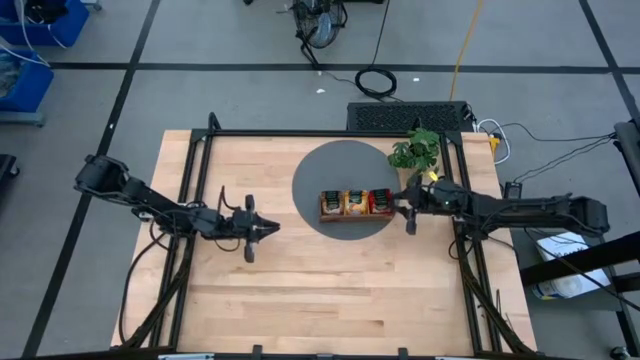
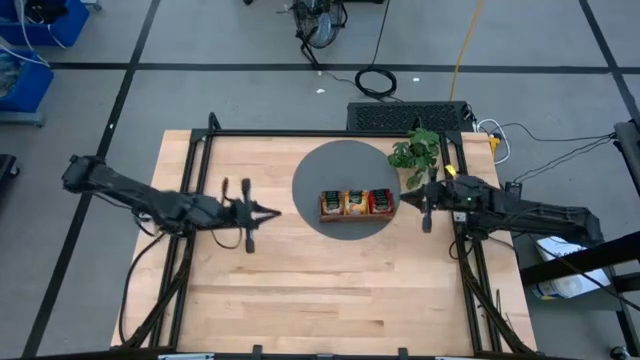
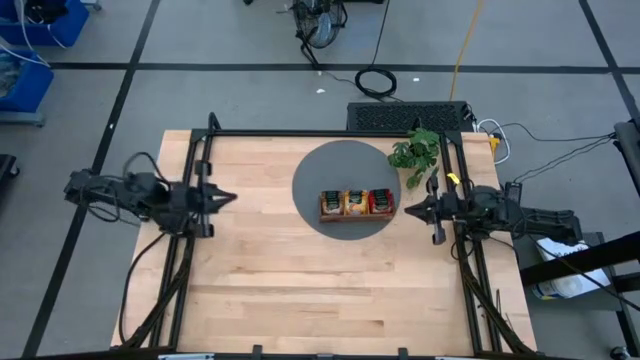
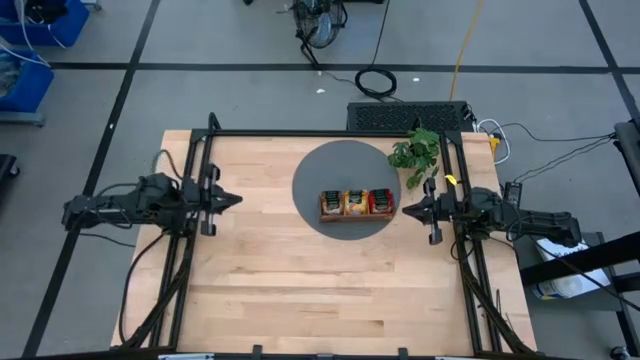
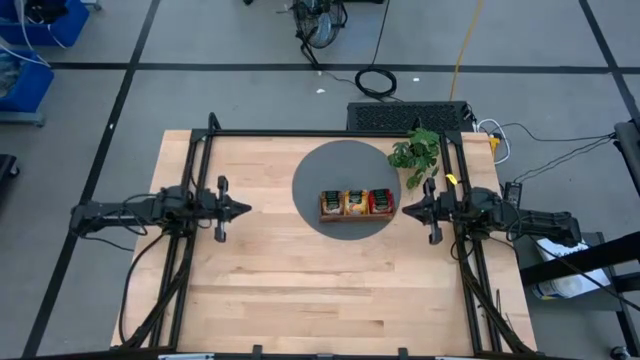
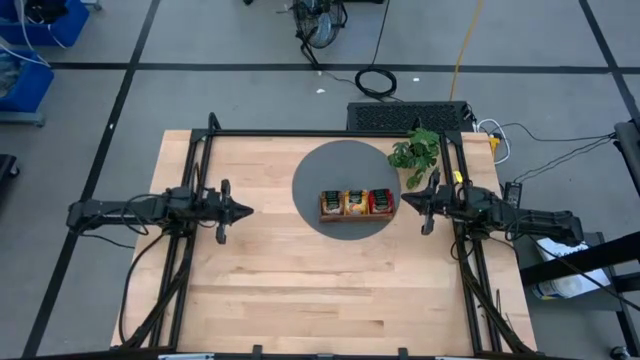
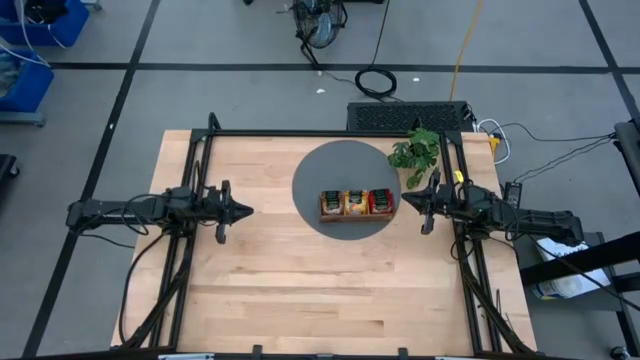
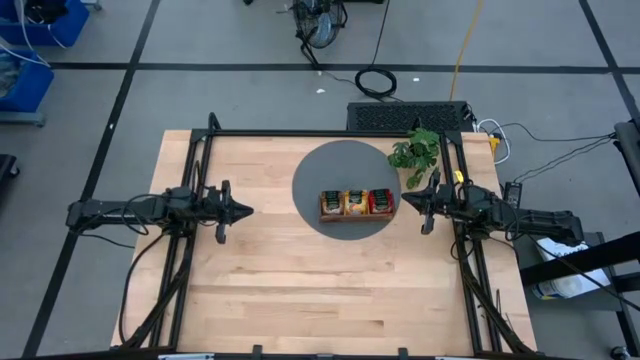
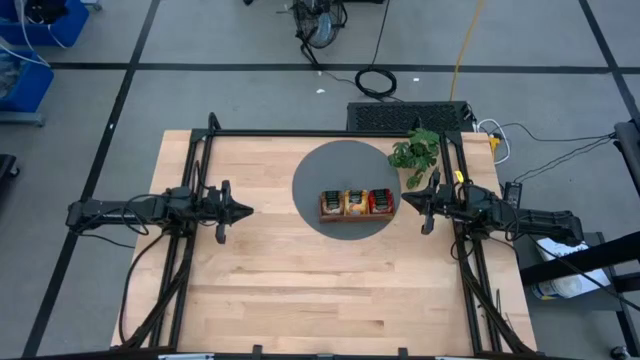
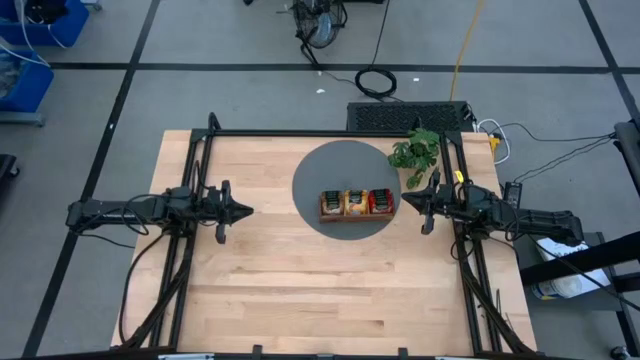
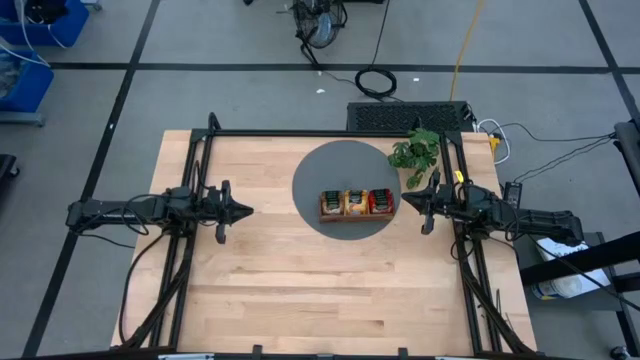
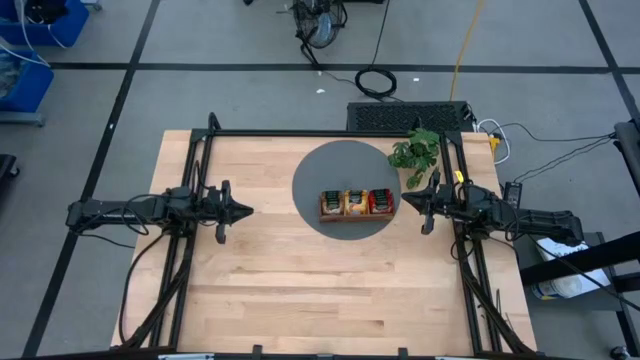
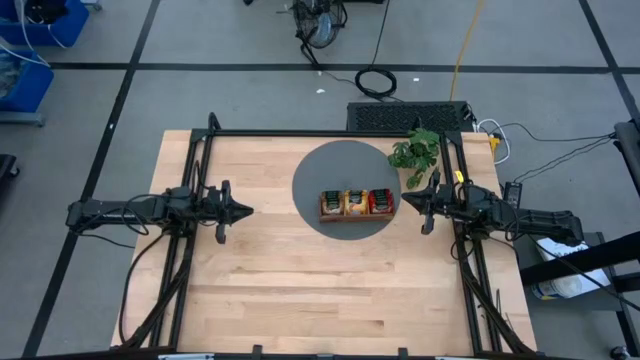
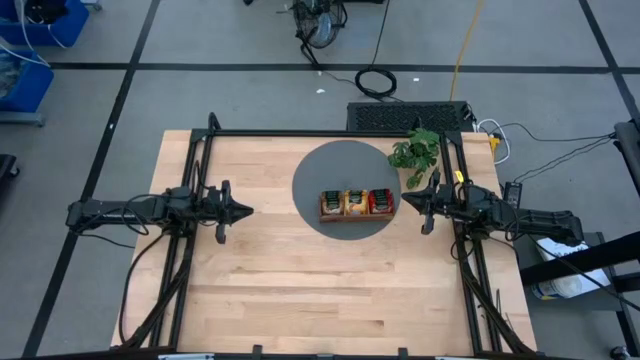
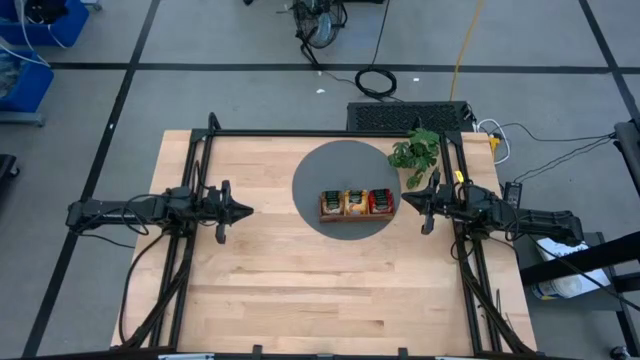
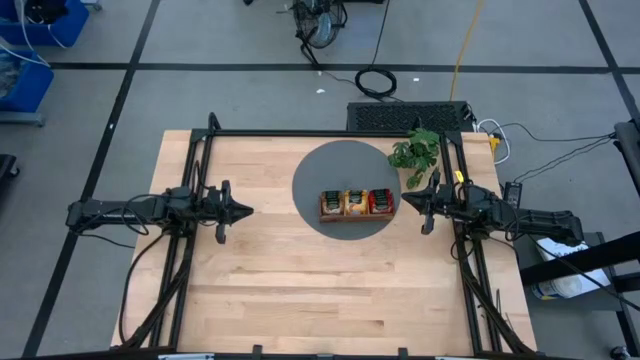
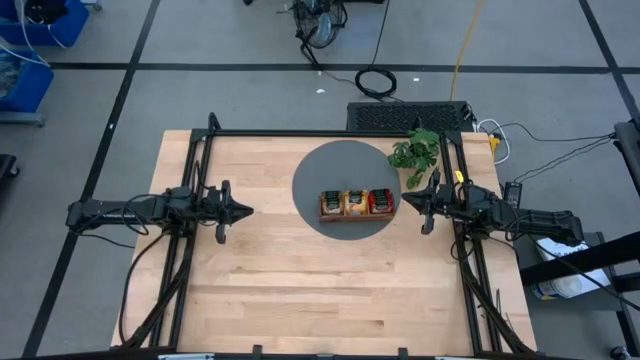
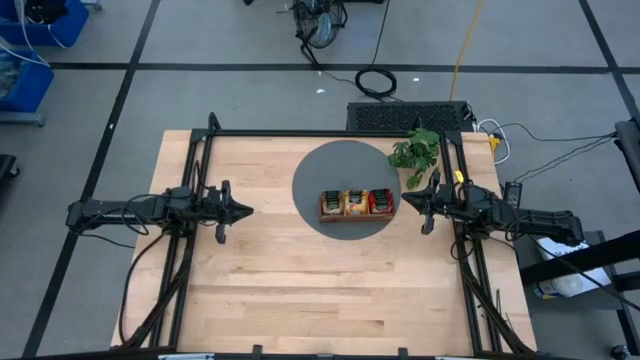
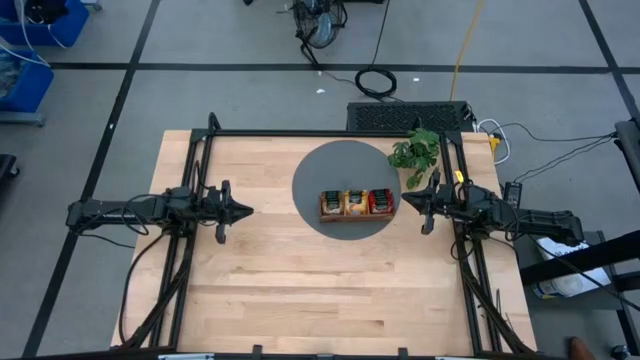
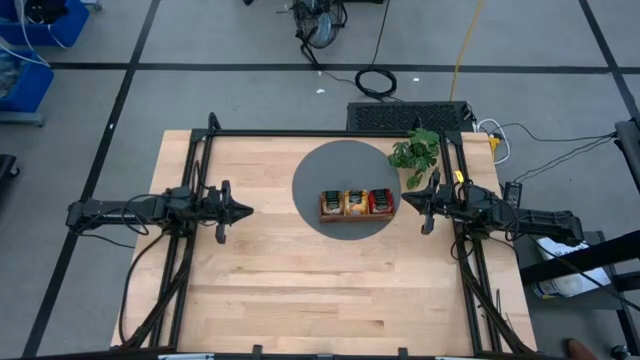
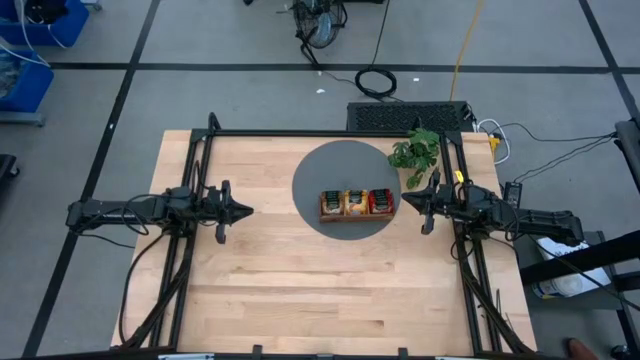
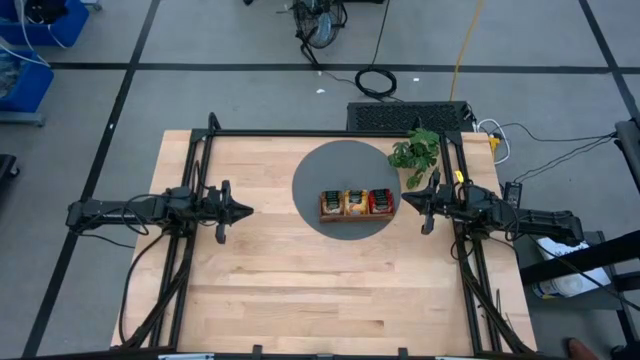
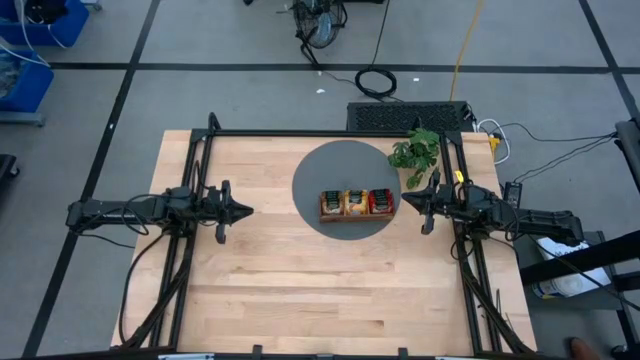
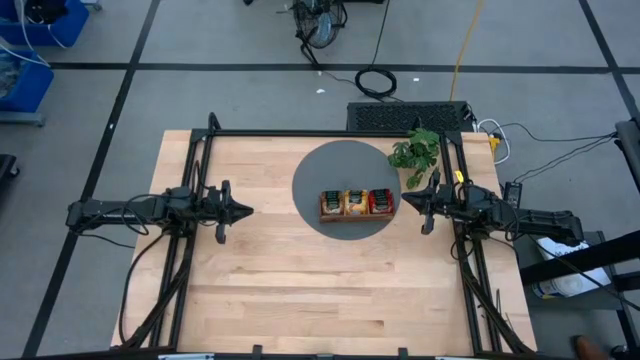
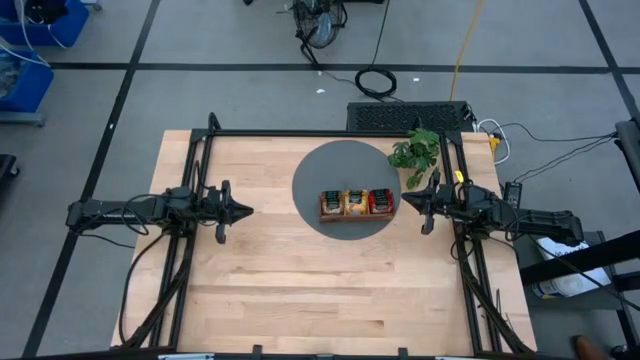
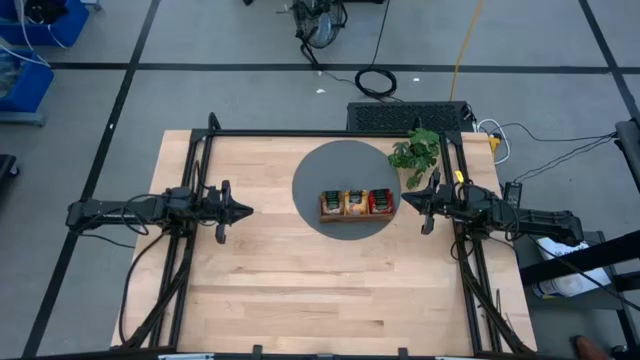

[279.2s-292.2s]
Task: Pick & Place Tea
Return to Home Position

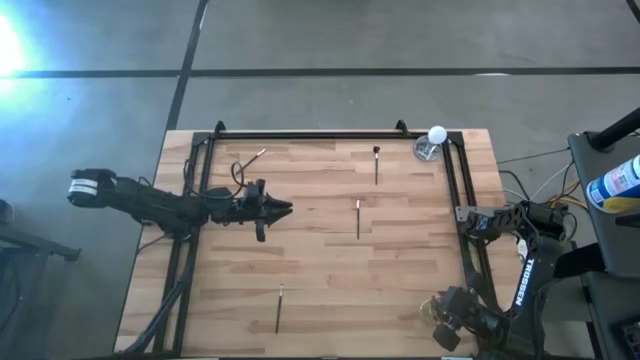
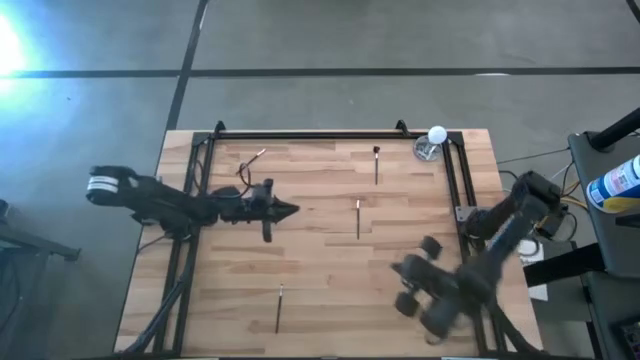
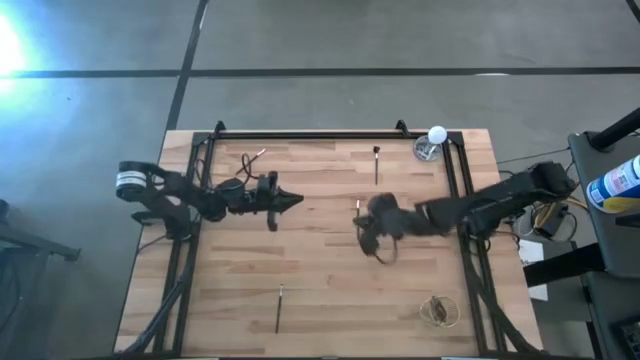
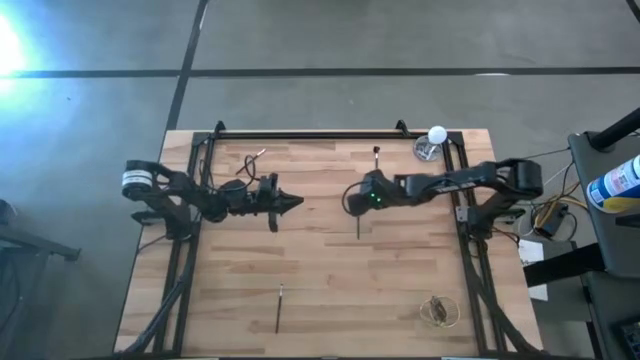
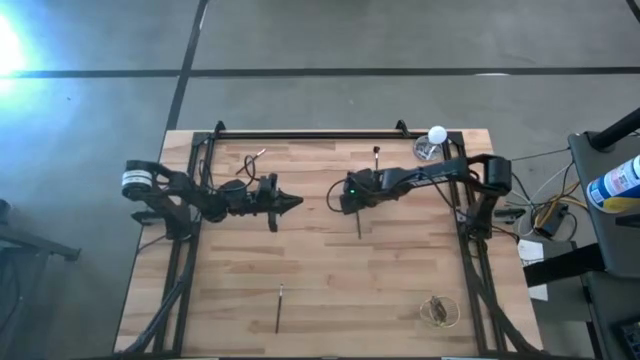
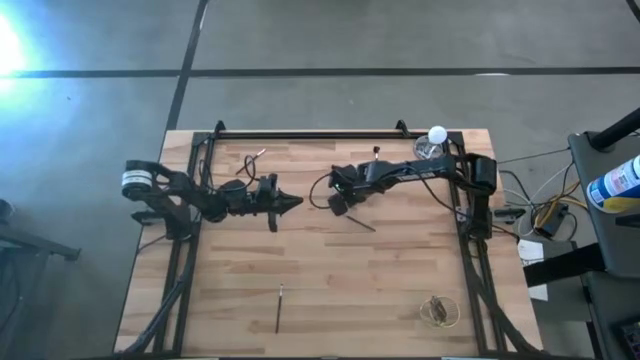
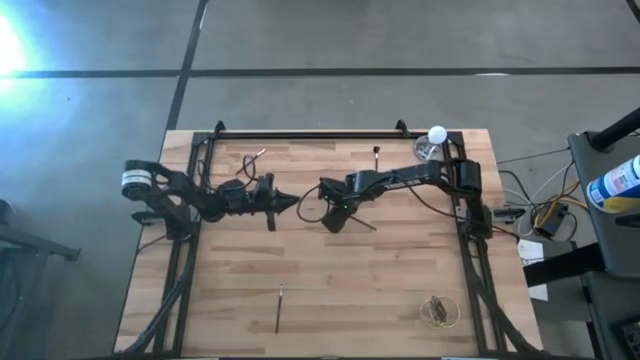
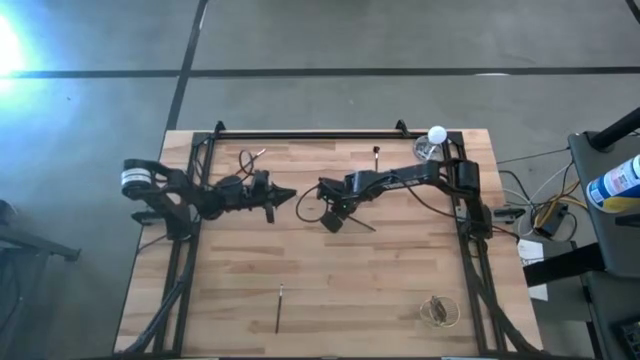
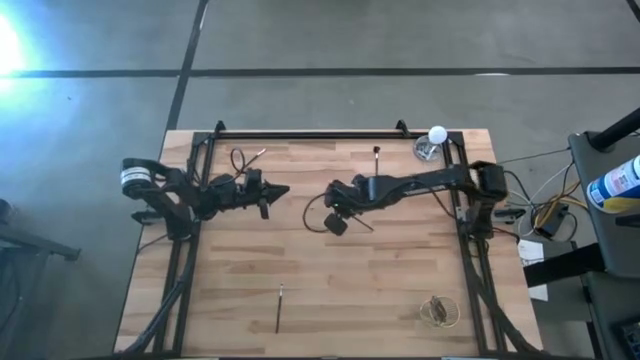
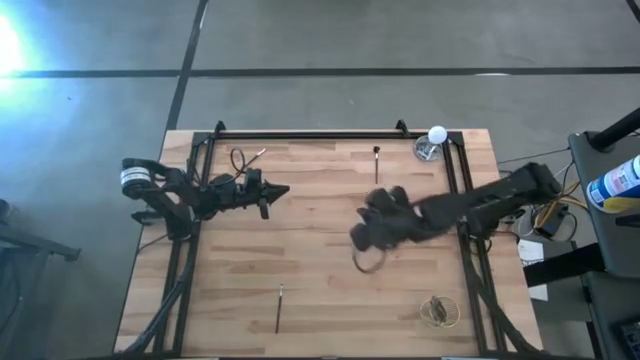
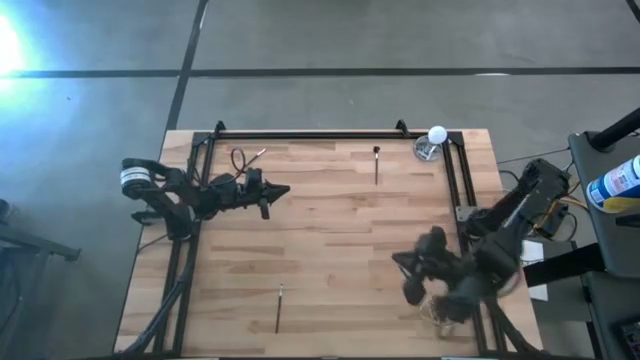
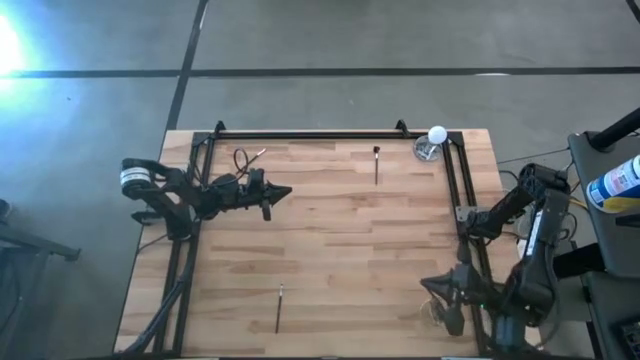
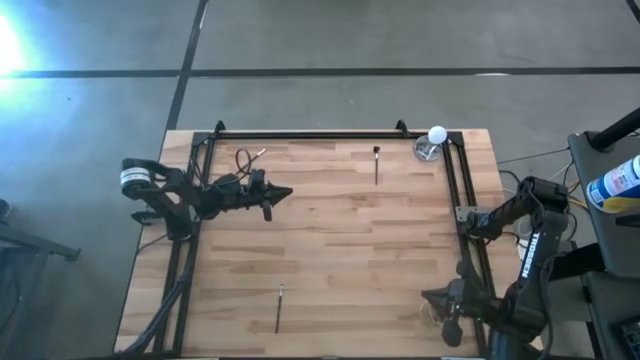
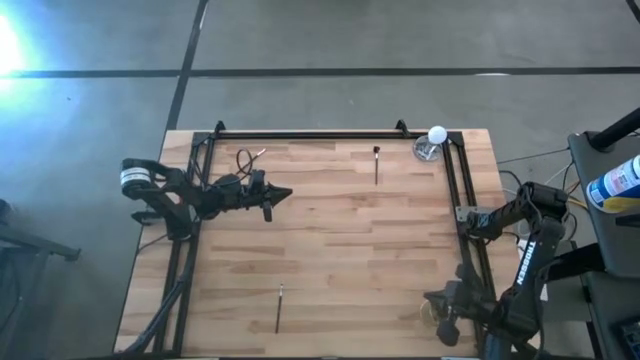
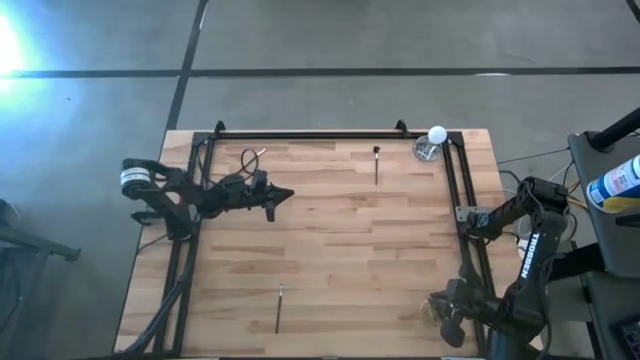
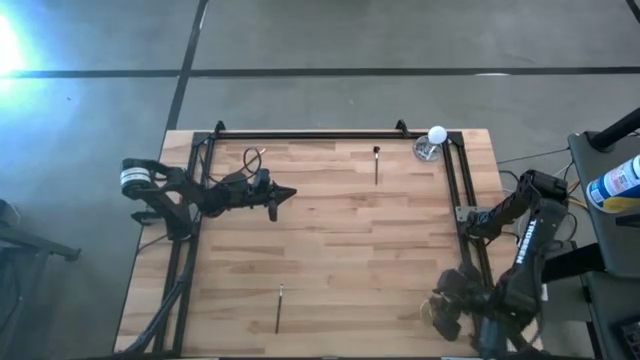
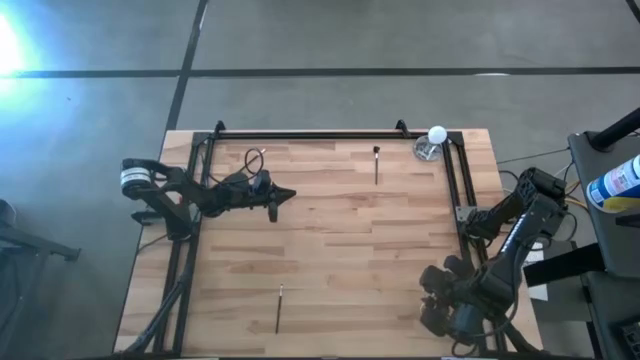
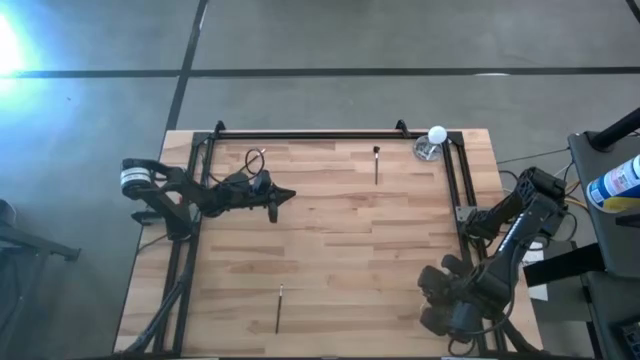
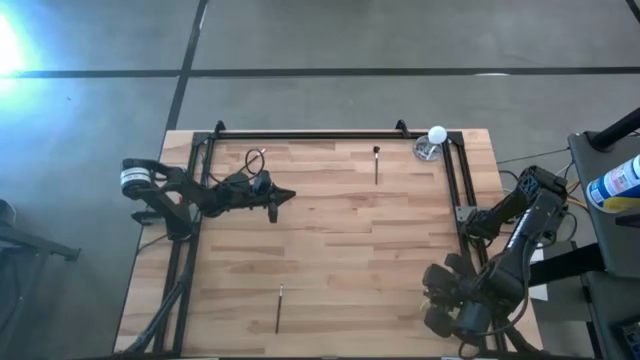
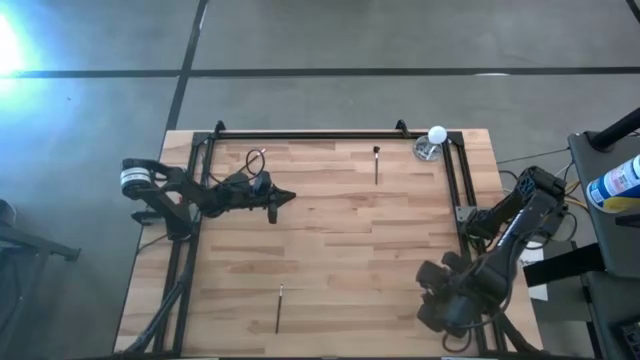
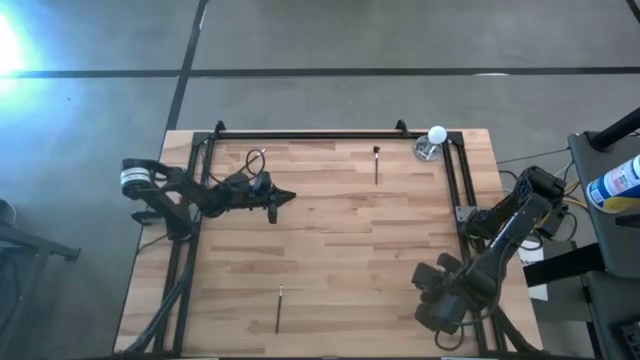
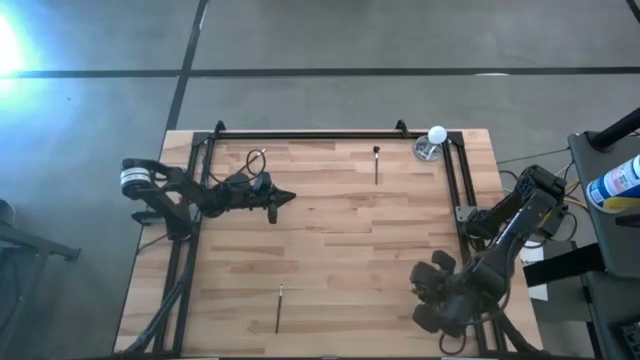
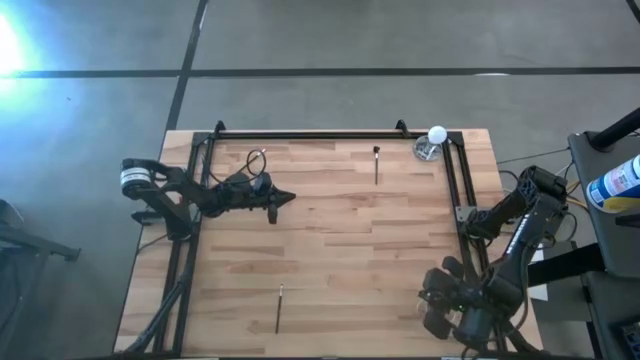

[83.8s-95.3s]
Task: Pick & Place Makeup Brushes
Put the eyeshadow brush into the makeup brush holder
